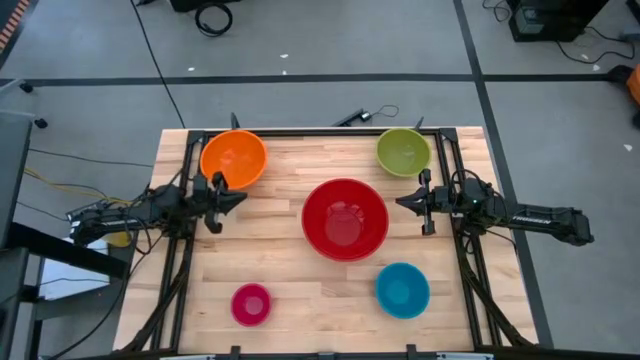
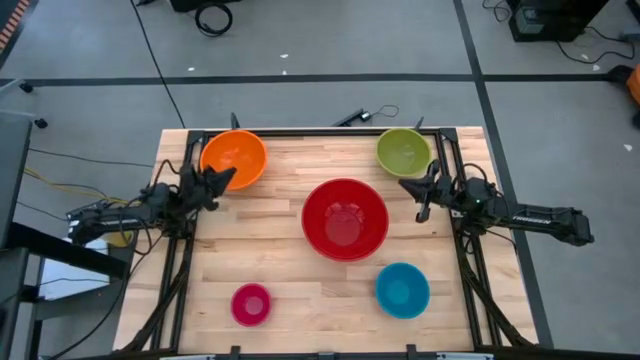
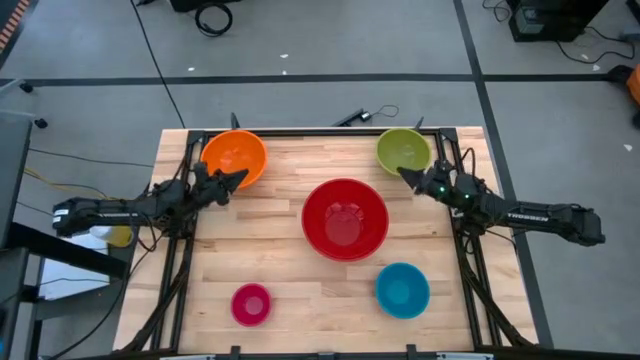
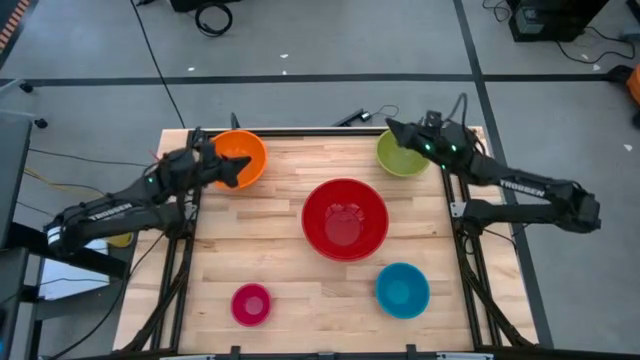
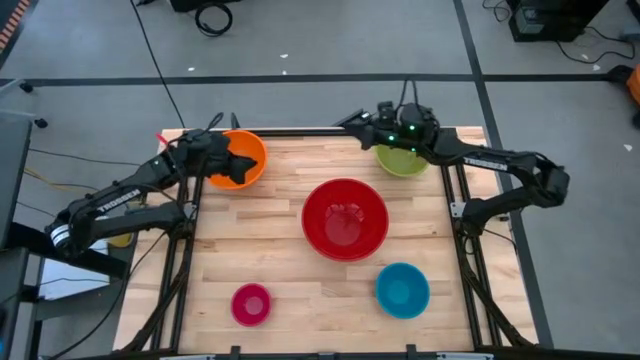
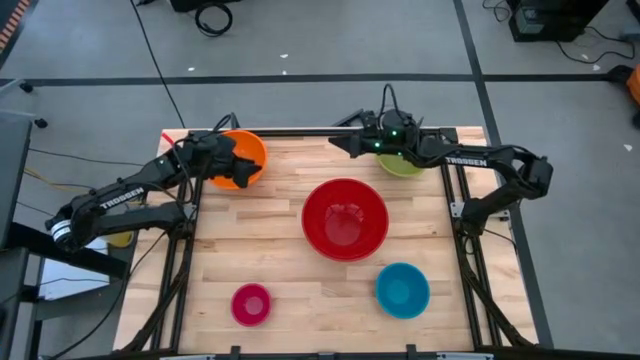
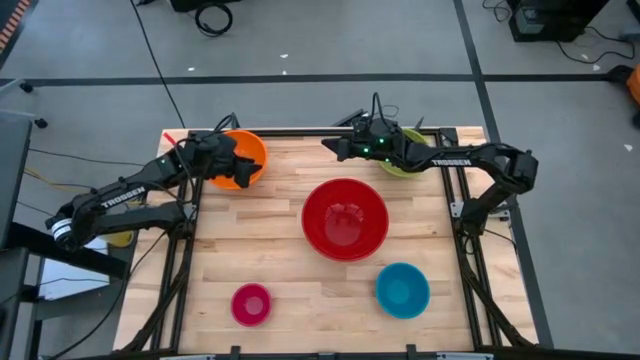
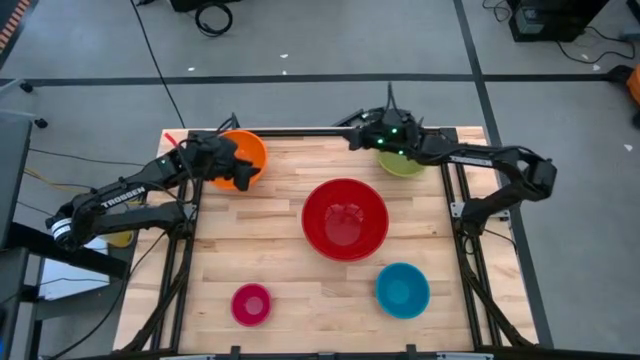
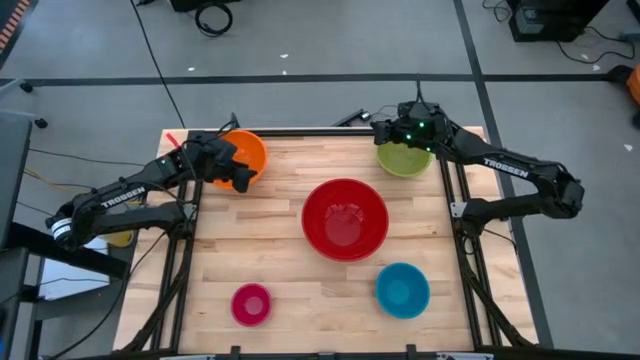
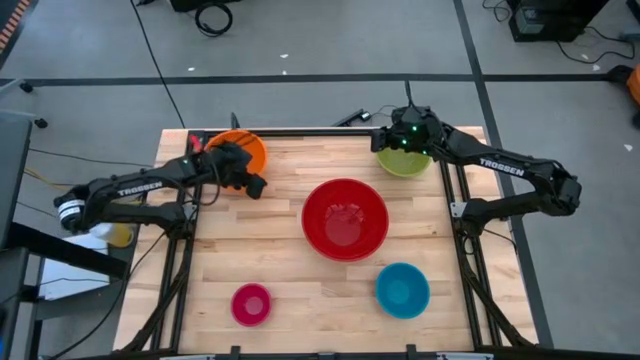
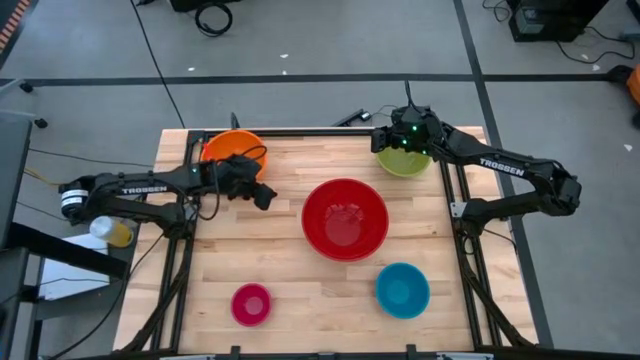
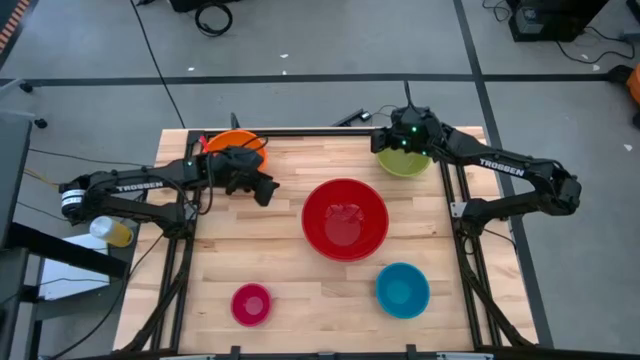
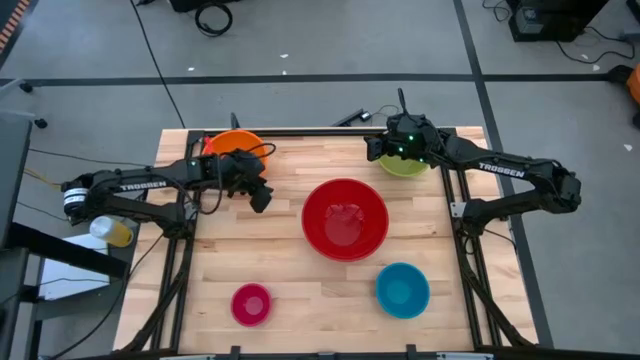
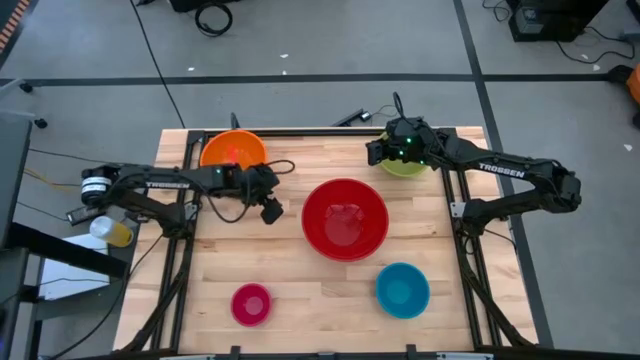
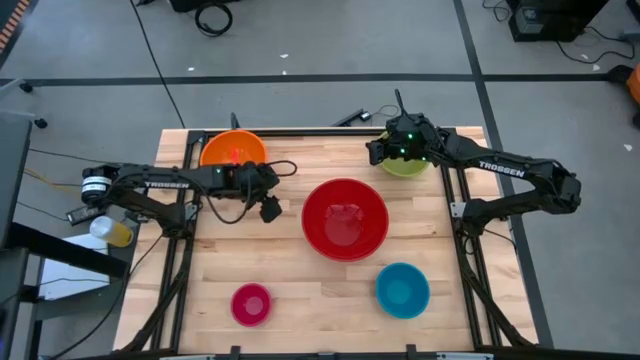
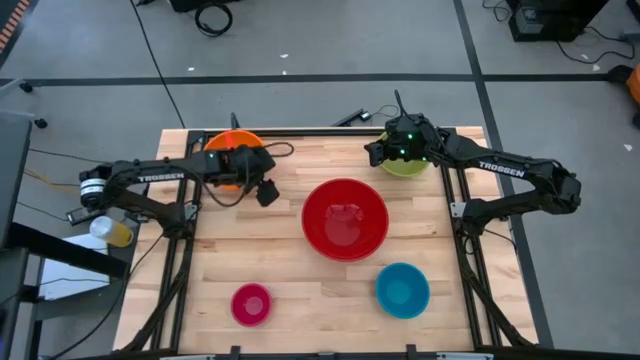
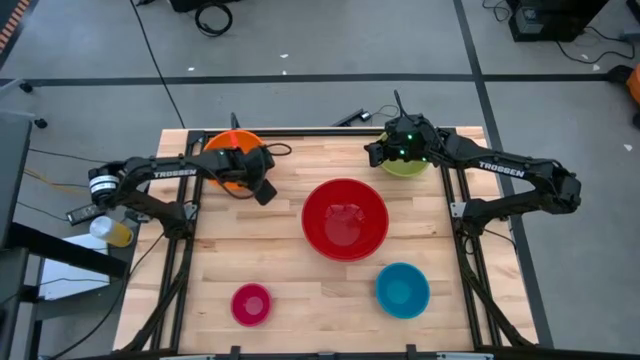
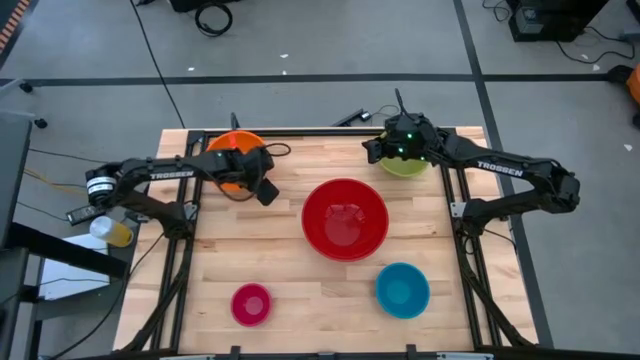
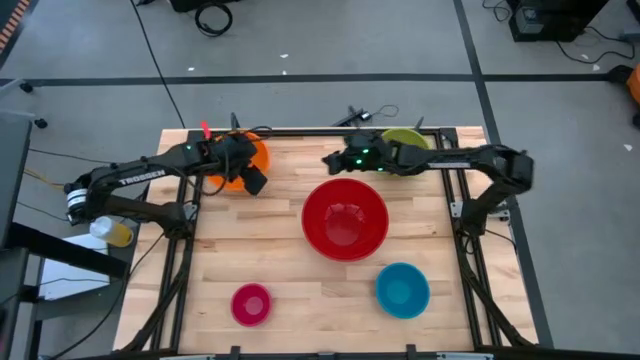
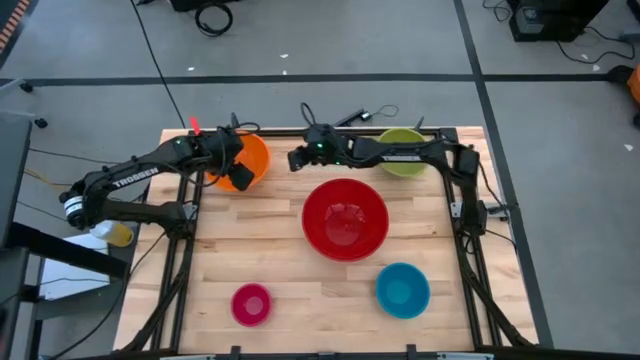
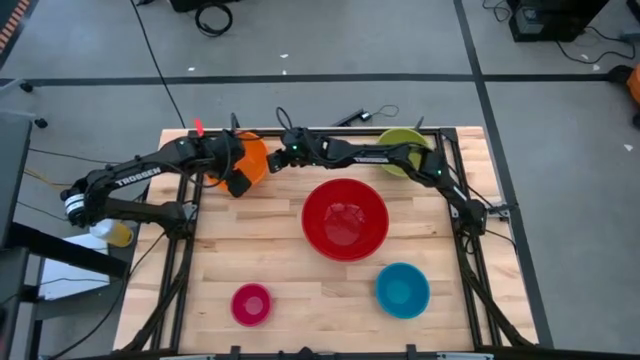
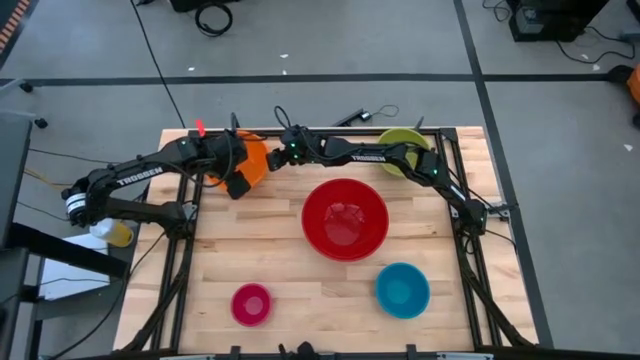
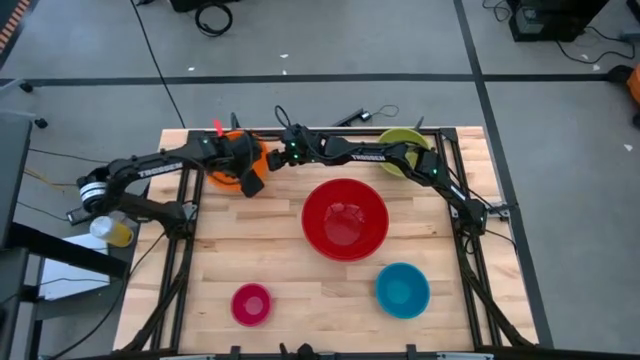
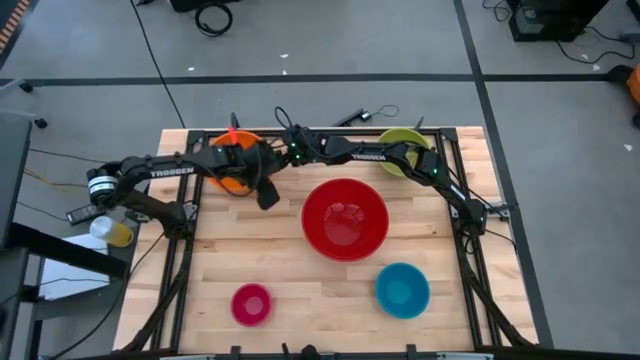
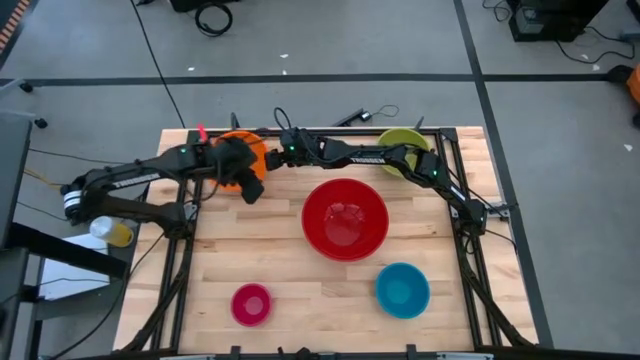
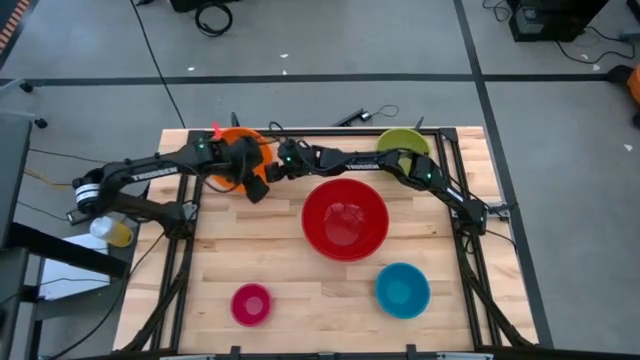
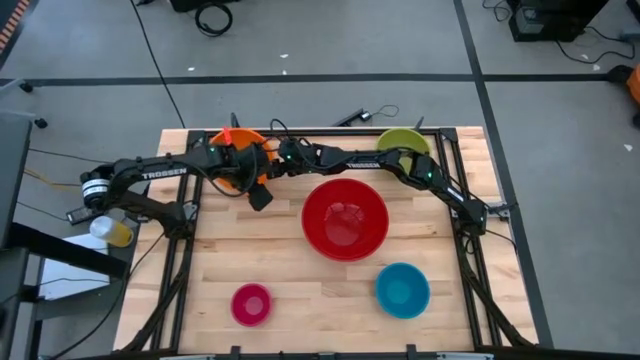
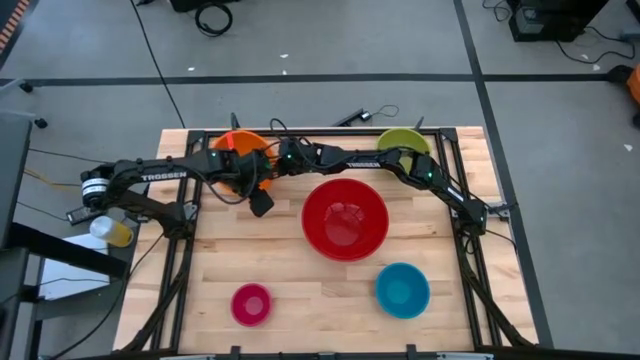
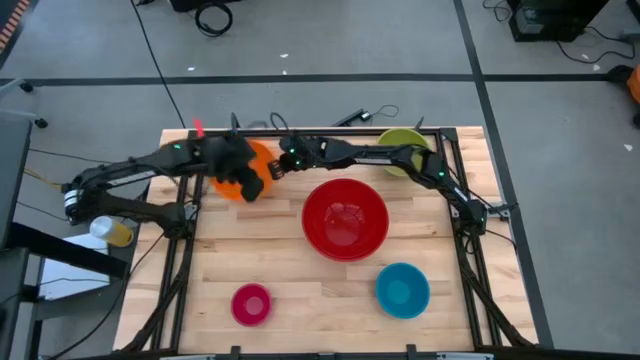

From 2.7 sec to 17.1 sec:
Stack the orange bowl into the red bowl

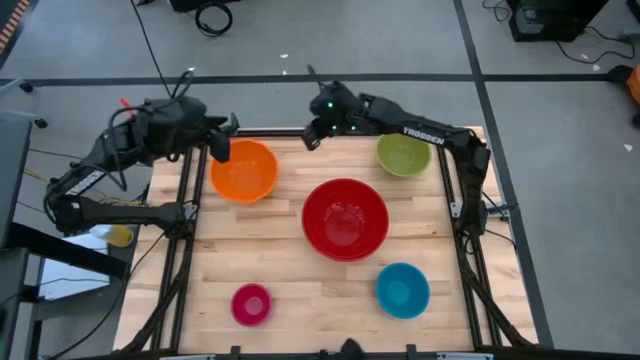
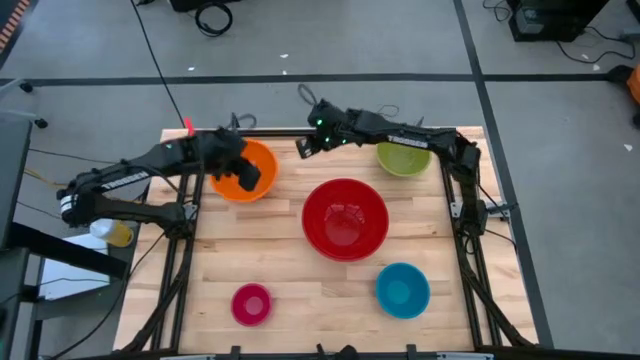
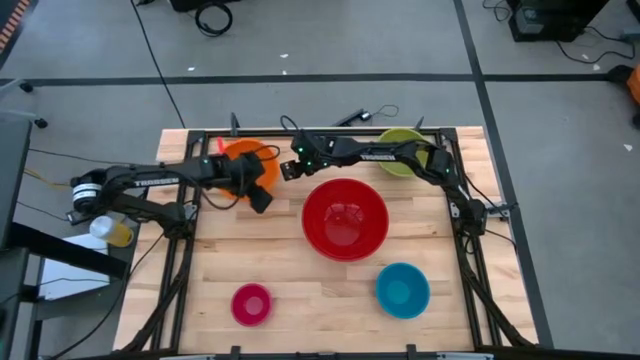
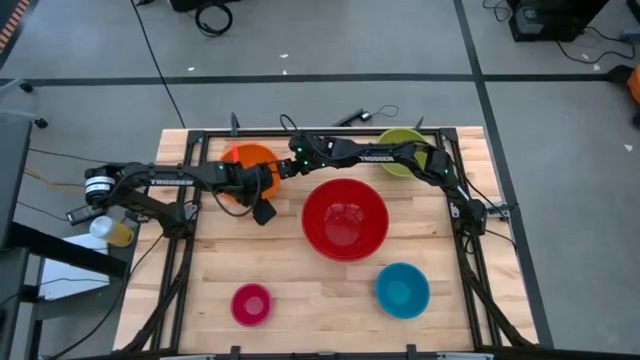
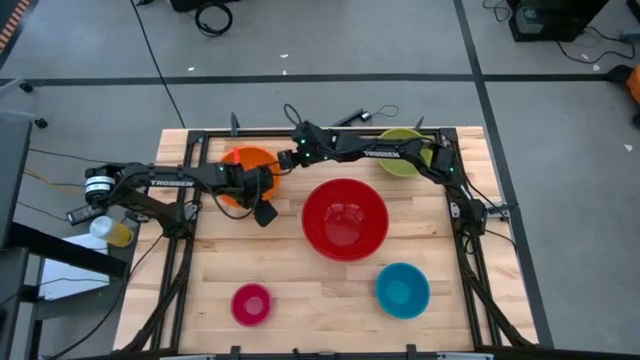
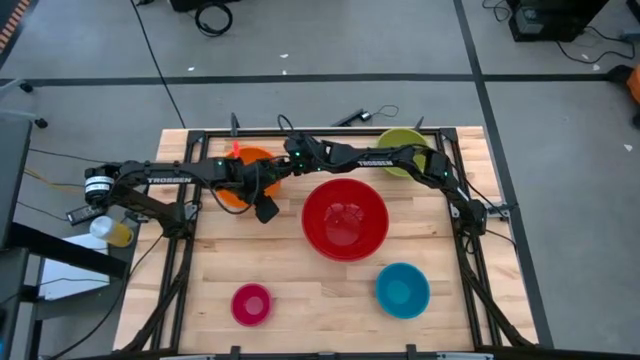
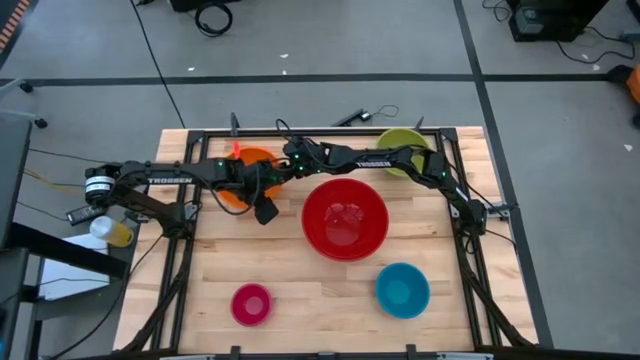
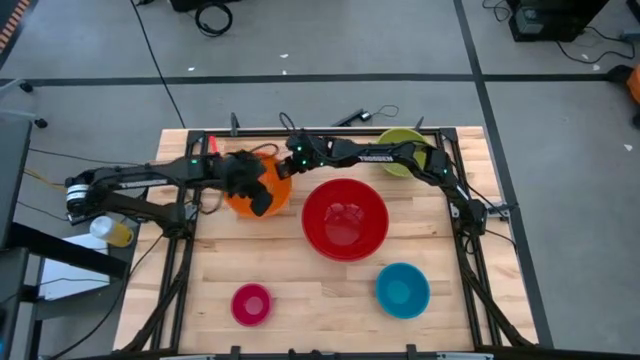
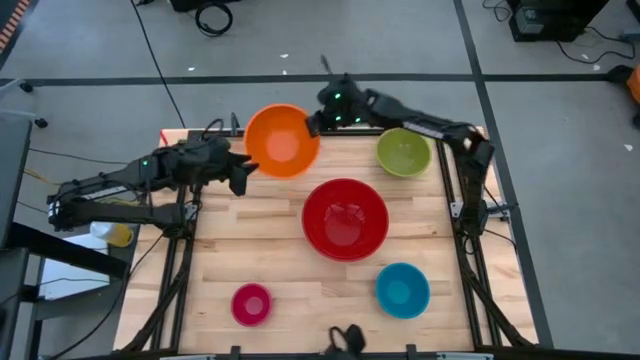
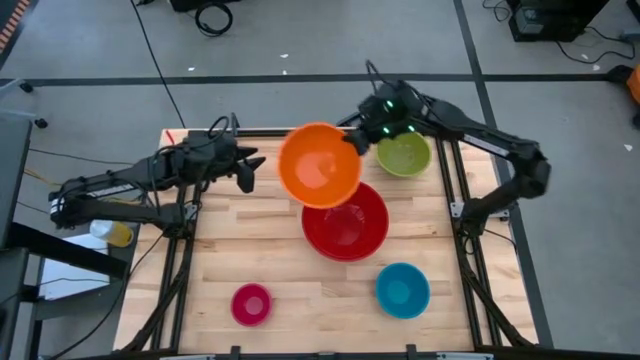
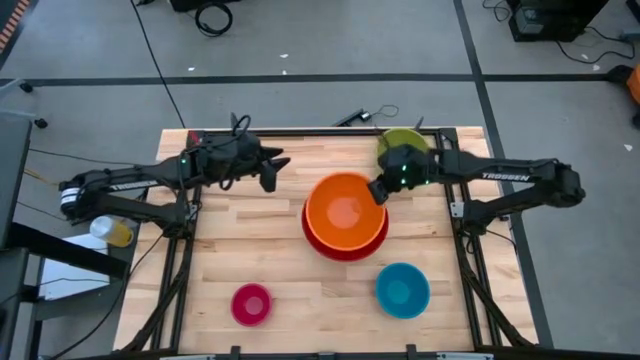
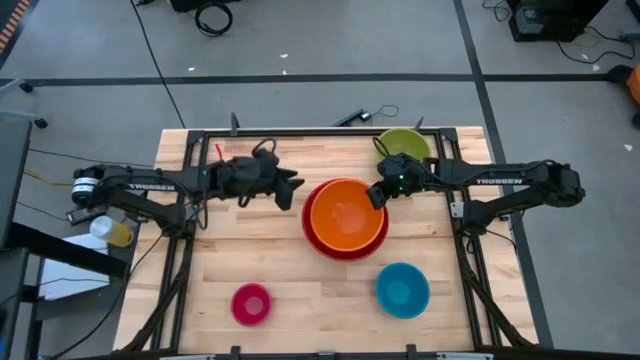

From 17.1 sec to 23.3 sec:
Stack the orange bowl into the red bowl

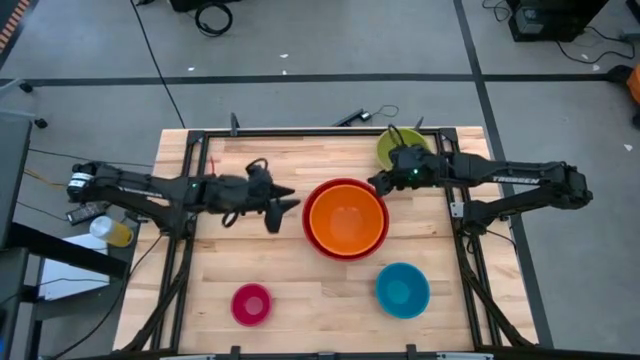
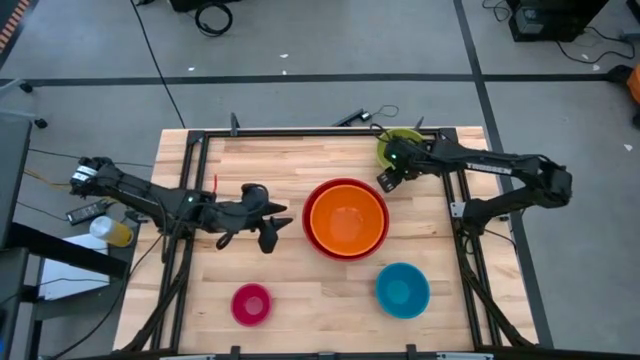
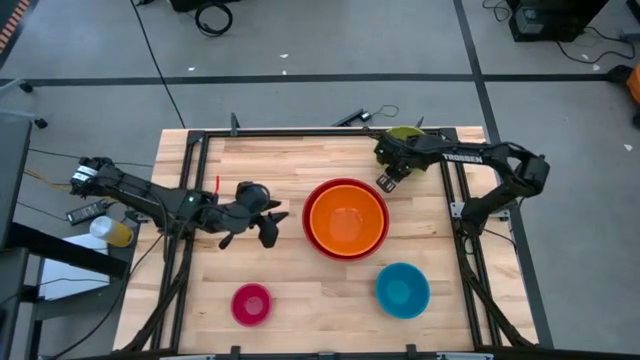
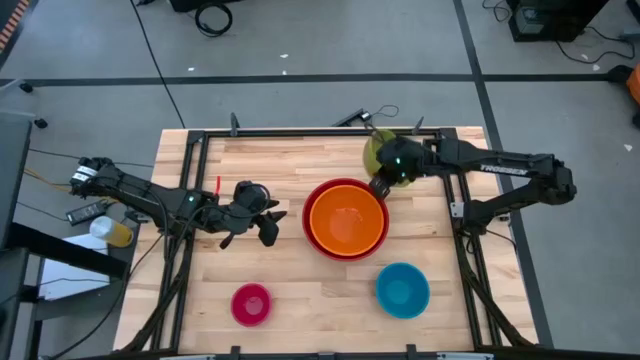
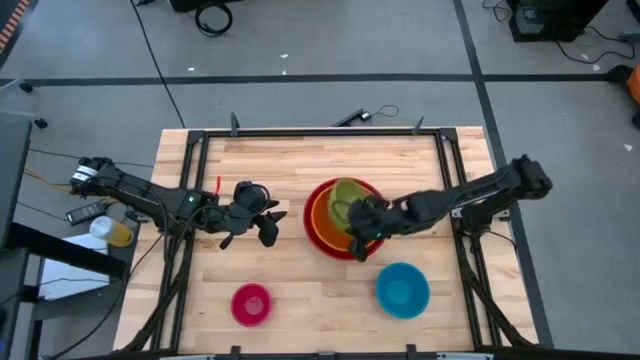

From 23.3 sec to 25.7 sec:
Stack the green bowl into the orange bowl
